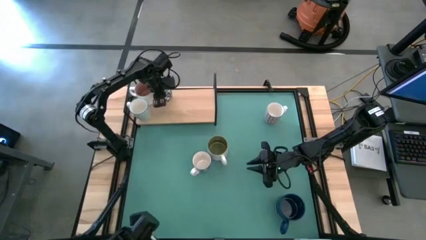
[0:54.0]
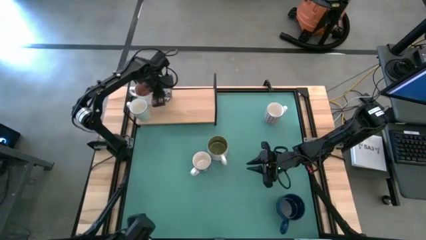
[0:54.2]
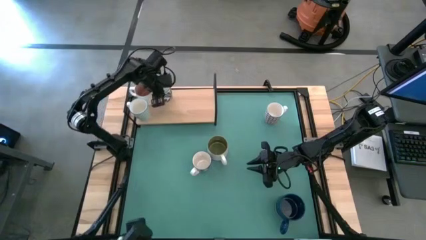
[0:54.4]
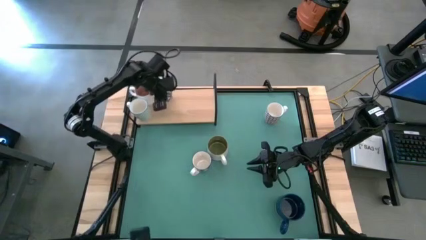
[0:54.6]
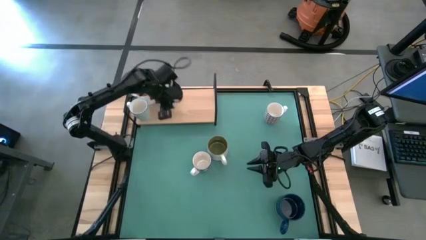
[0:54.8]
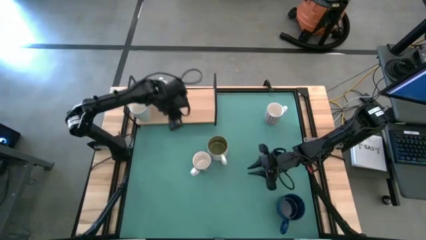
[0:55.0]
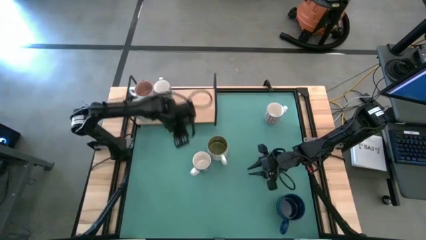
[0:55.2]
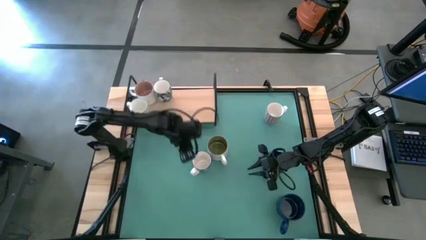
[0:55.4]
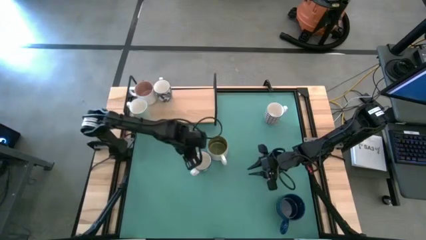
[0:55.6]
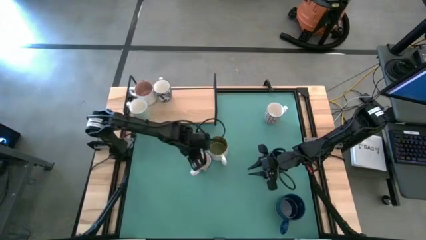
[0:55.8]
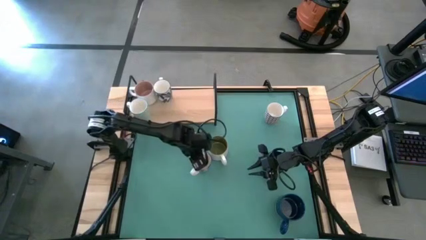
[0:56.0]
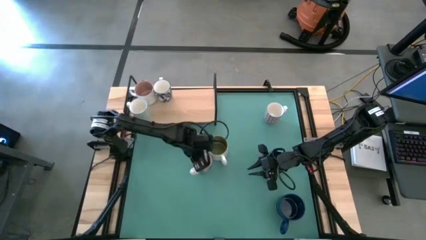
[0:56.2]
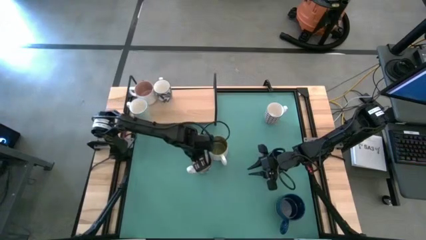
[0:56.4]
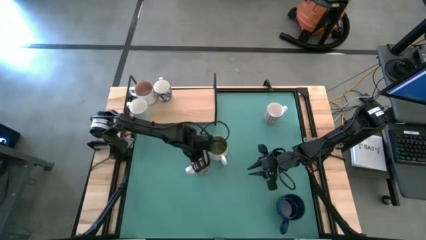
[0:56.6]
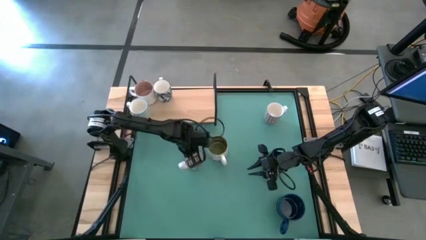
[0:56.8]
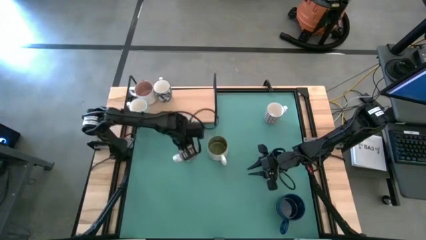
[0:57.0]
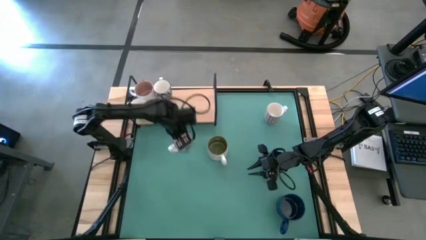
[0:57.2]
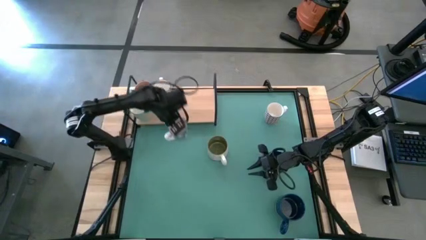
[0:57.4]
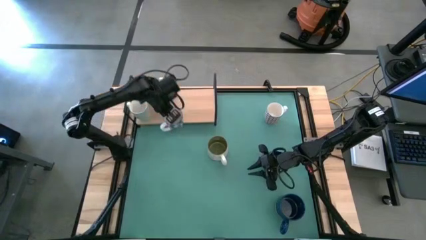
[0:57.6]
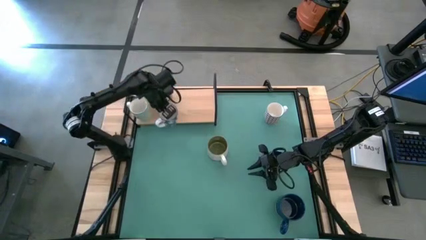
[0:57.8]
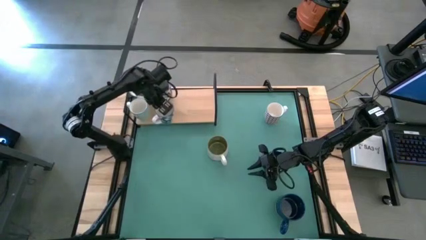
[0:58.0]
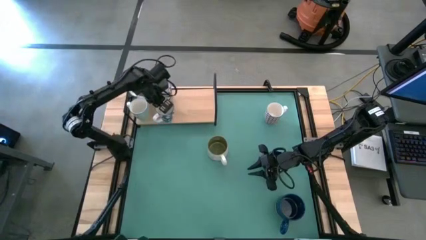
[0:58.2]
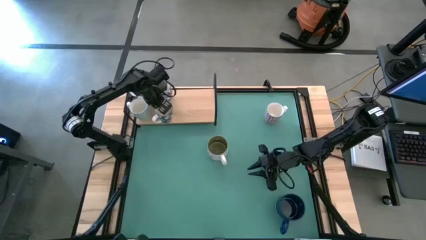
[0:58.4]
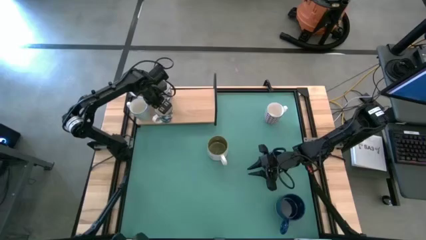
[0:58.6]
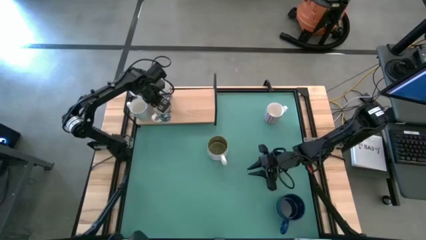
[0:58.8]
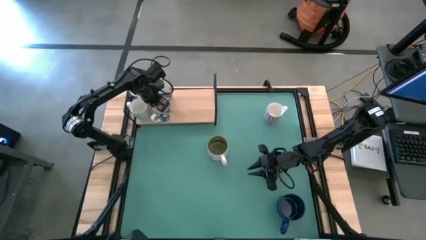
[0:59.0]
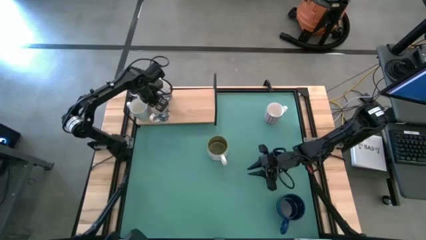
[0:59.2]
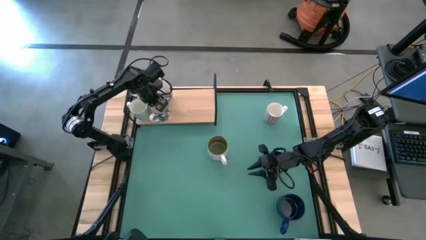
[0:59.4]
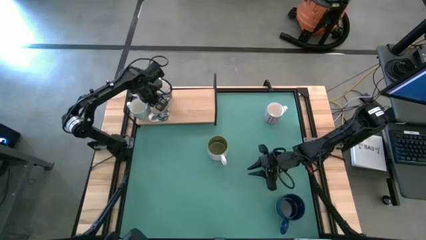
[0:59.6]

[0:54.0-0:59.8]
Task: Place coffee mugs
Put the blue patterned mug on the shelf

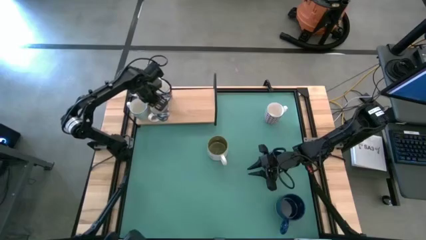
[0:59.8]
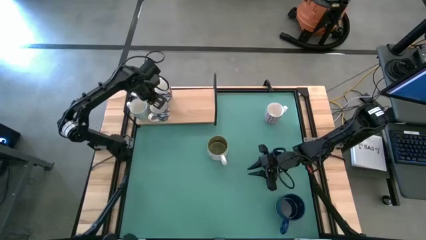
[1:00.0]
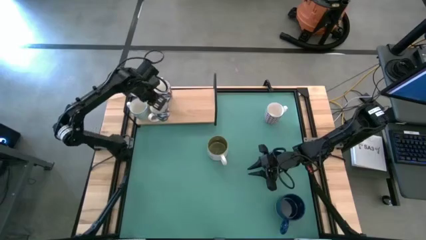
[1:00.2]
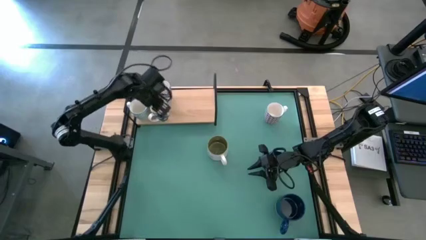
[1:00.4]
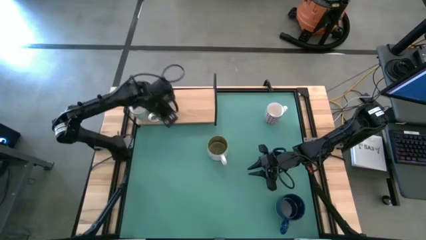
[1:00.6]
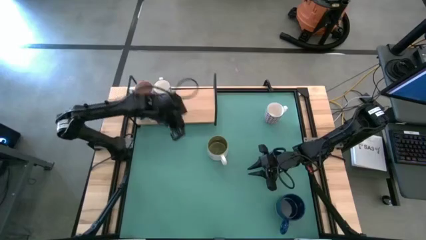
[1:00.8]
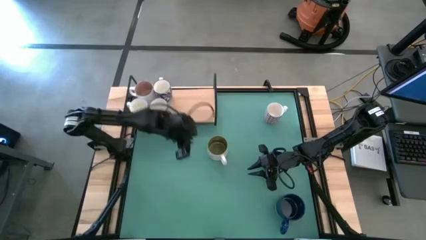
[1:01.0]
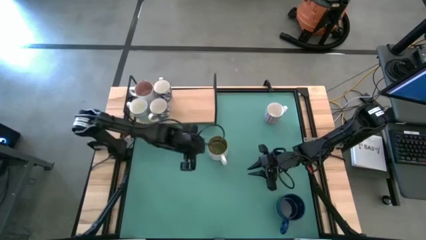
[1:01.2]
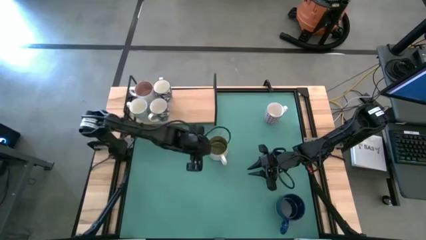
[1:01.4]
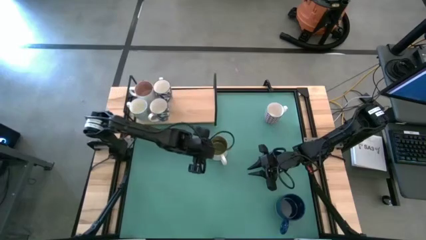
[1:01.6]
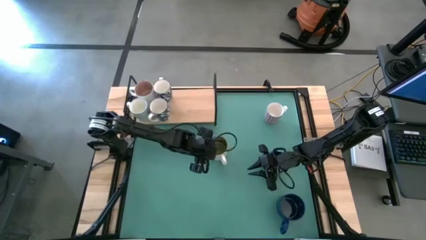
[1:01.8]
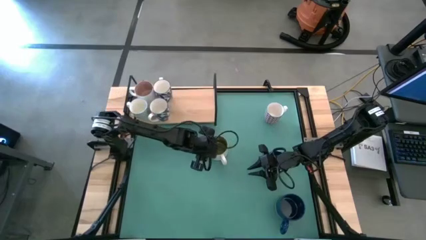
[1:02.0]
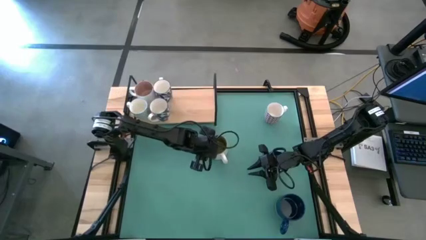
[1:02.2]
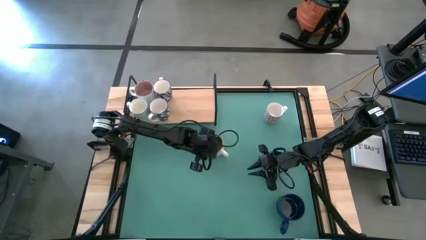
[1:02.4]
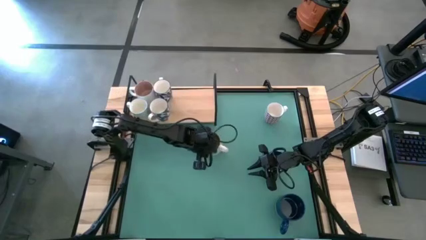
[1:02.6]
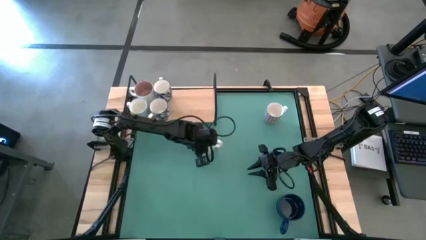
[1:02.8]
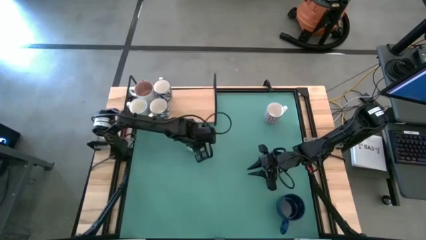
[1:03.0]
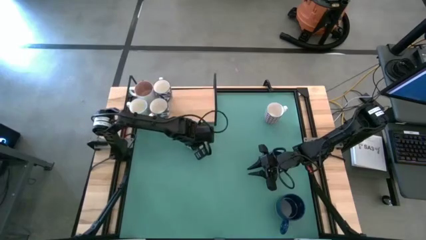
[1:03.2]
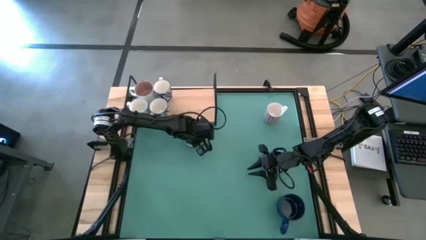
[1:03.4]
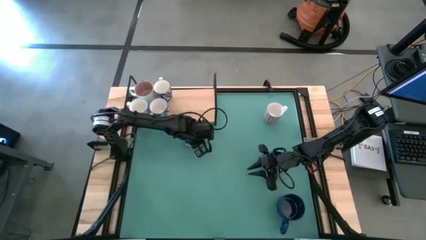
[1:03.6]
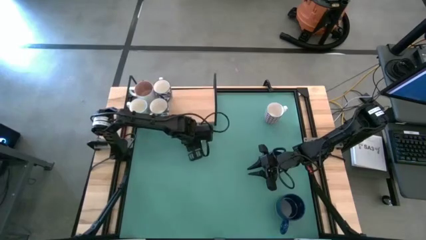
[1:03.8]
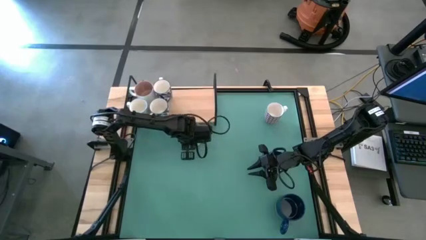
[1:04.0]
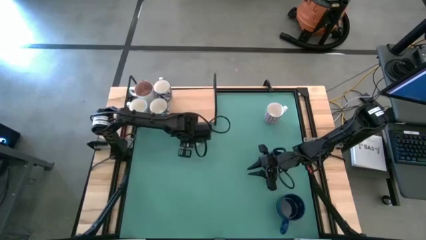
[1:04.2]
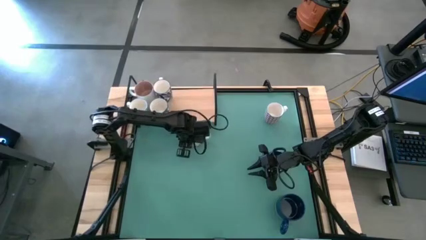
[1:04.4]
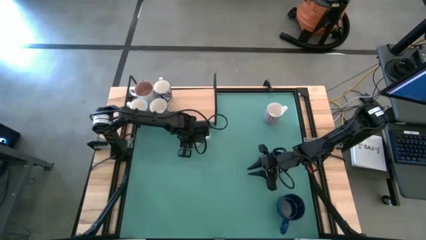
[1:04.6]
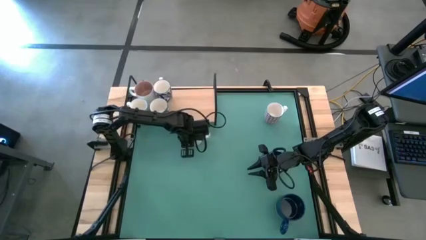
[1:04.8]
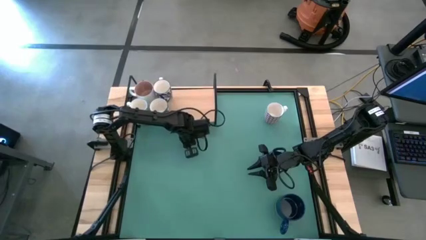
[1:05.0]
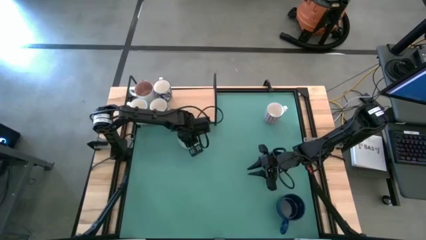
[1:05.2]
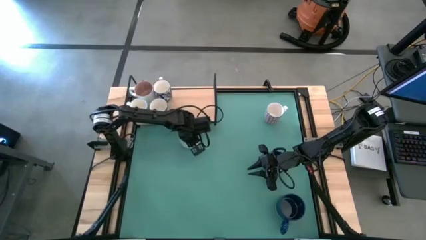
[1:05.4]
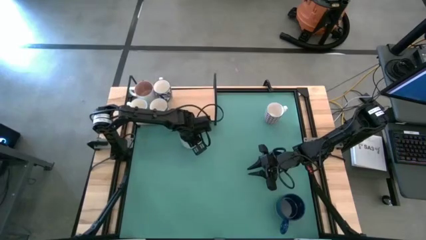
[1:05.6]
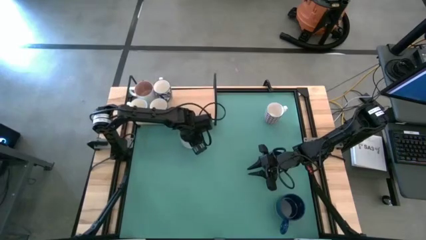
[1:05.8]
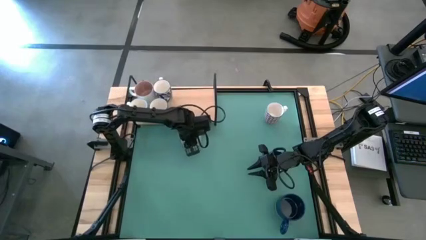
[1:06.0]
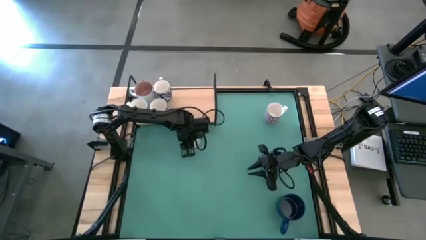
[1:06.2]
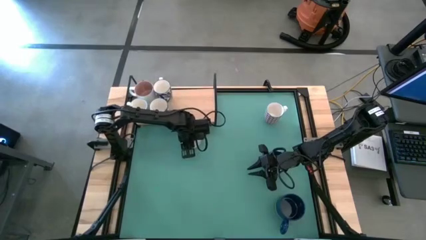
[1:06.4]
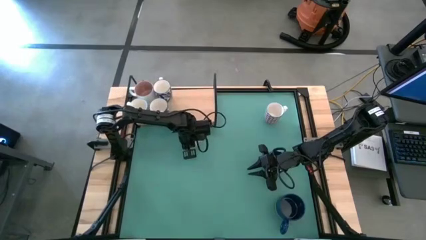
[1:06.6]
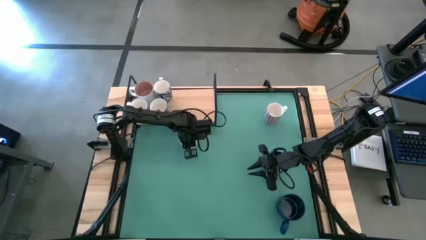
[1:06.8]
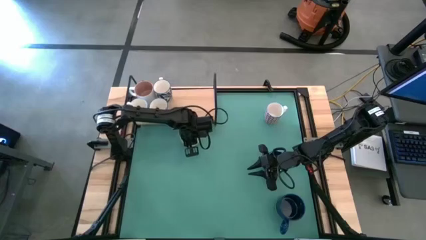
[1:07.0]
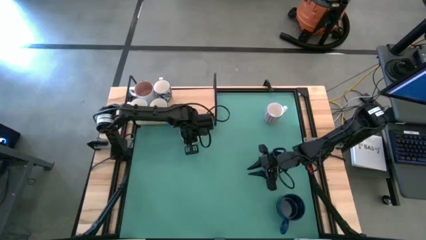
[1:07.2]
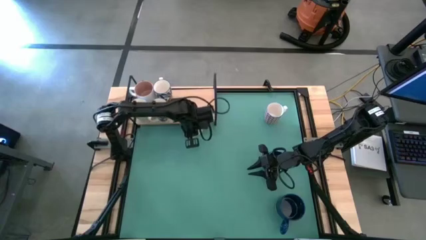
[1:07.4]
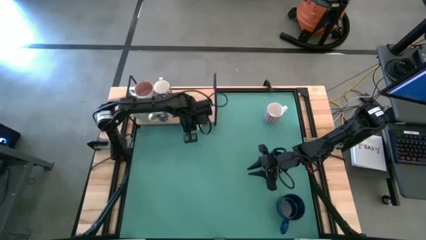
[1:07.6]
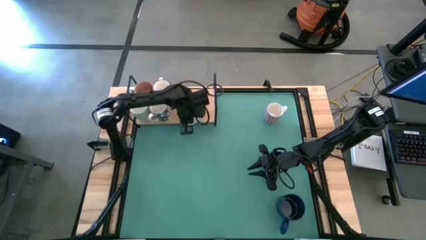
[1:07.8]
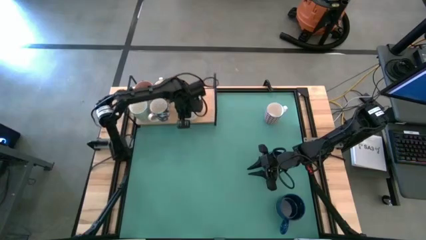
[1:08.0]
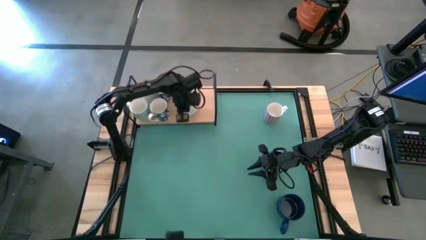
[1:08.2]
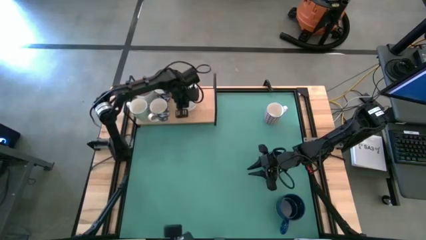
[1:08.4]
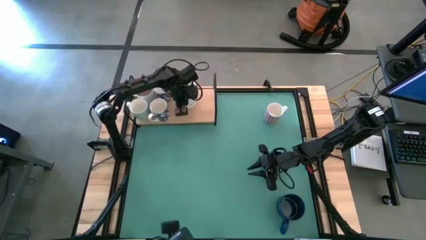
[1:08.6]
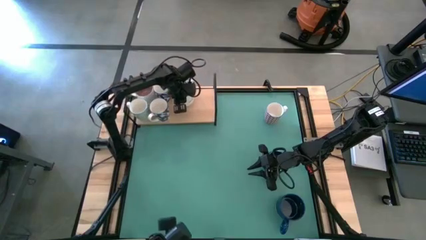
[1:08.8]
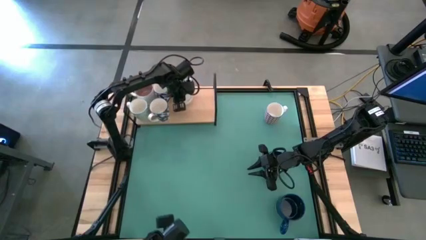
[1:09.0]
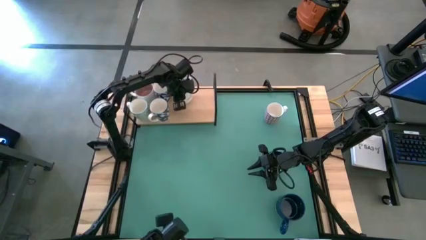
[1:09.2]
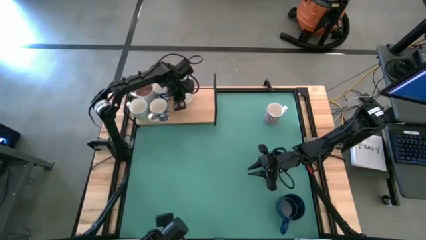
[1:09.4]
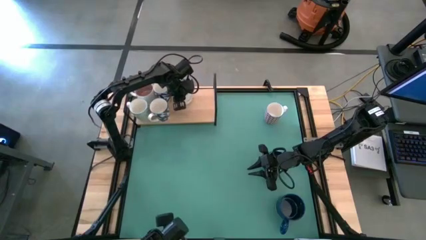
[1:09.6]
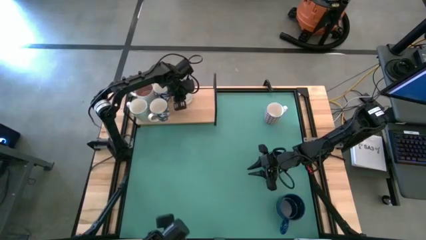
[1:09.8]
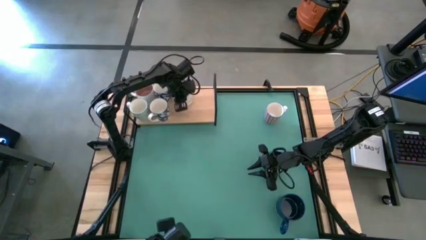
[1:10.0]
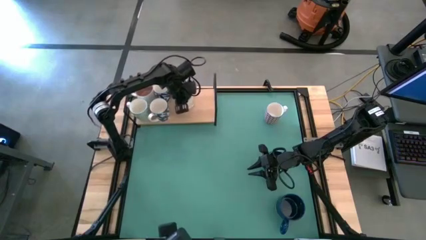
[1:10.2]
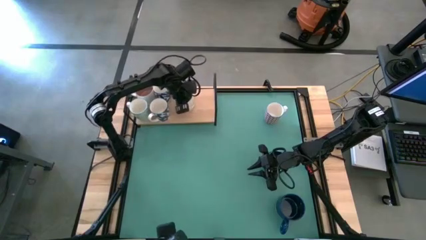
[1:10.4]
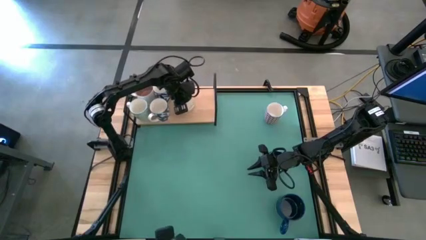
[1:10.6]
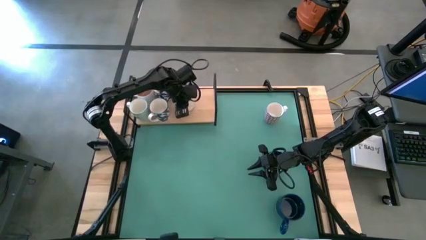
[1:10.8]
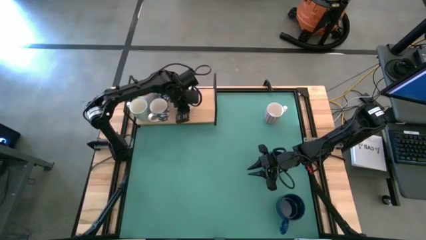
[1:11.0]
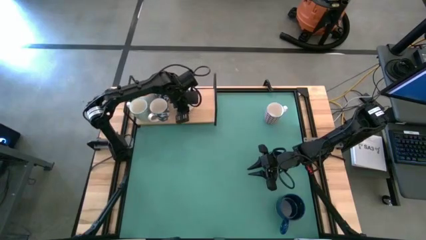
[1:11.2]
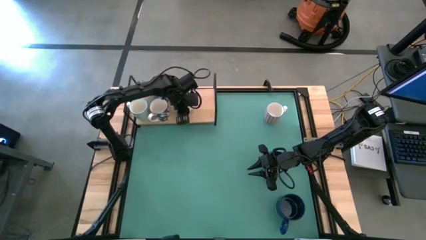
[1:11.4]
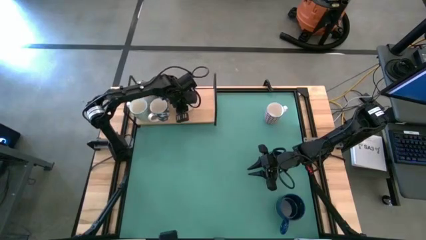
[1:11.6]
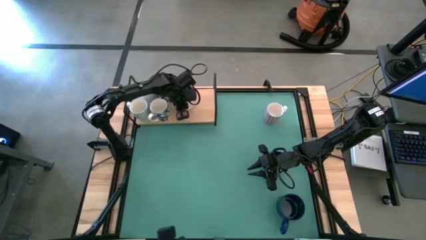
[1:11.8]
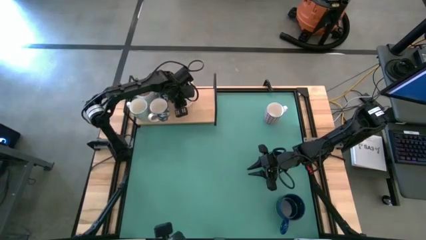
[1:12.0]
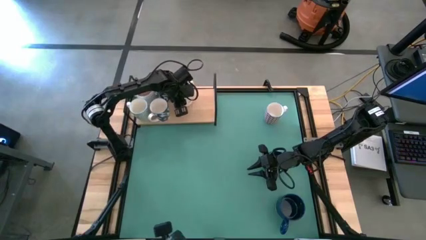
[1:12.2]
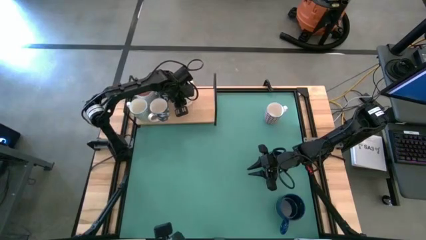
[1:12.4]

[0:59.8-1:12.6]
Put the green mug on the shelf
